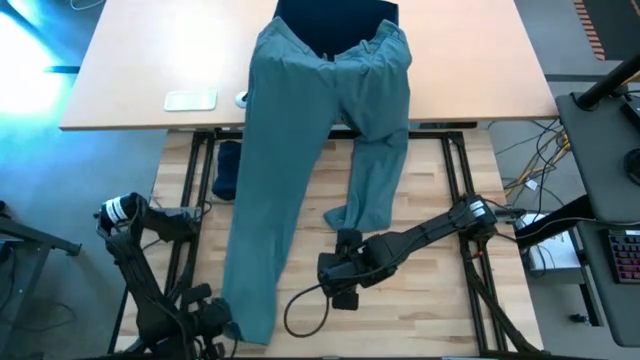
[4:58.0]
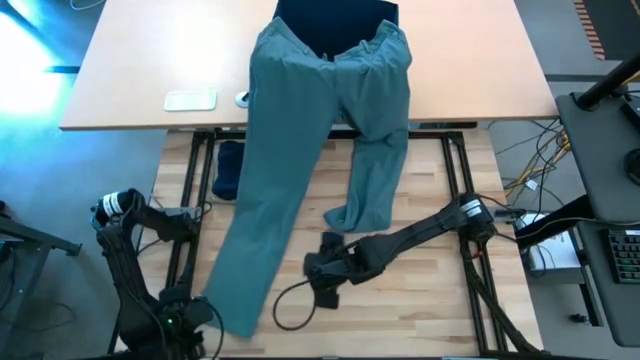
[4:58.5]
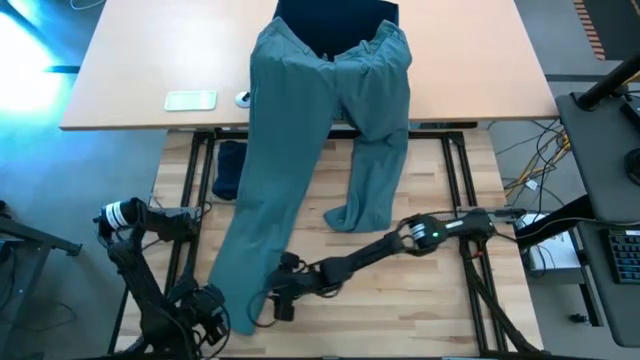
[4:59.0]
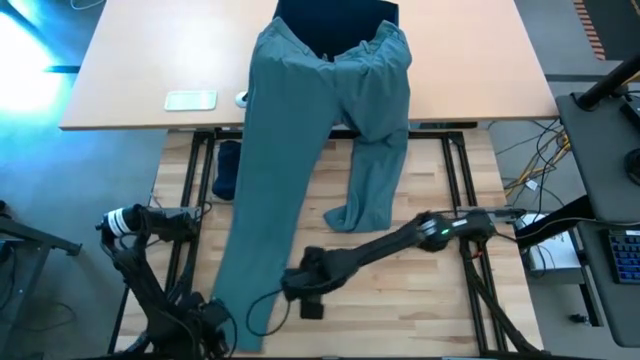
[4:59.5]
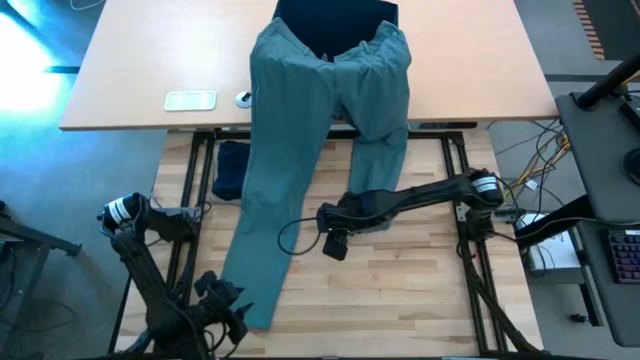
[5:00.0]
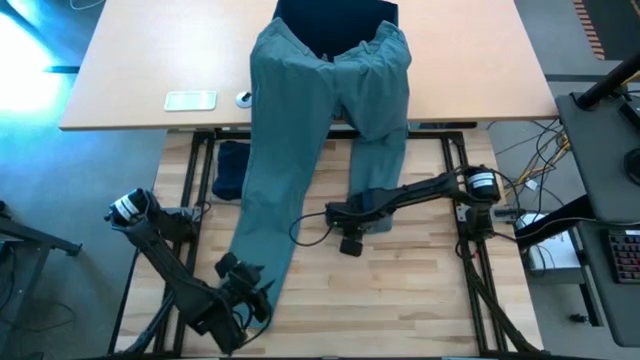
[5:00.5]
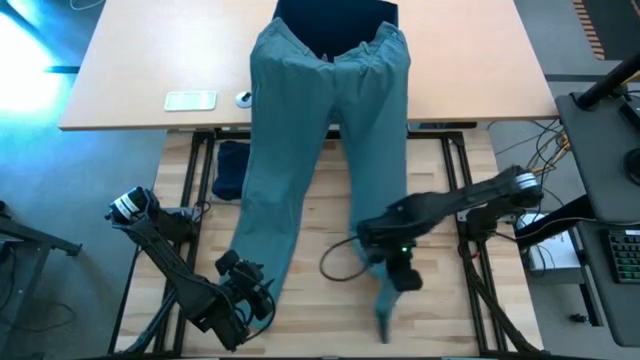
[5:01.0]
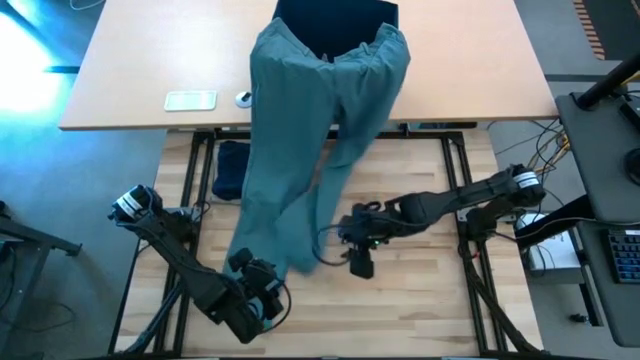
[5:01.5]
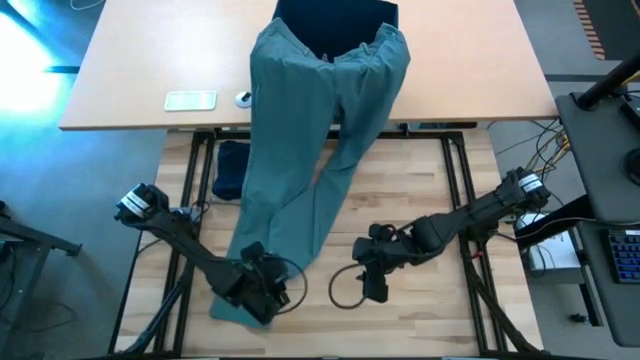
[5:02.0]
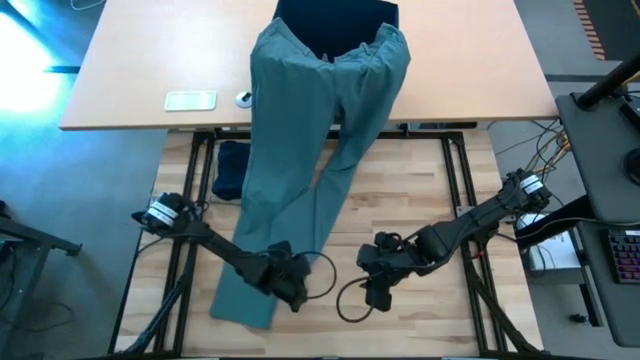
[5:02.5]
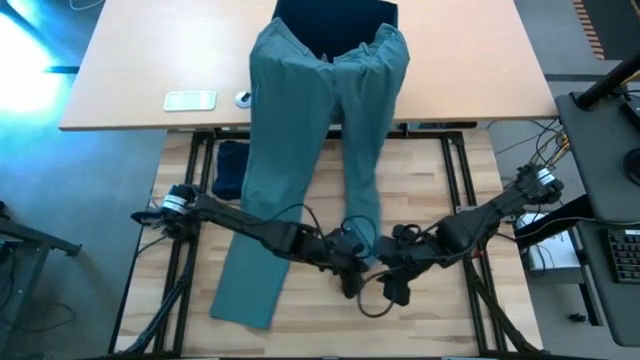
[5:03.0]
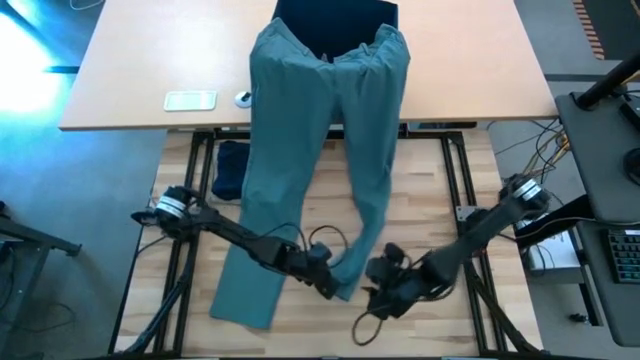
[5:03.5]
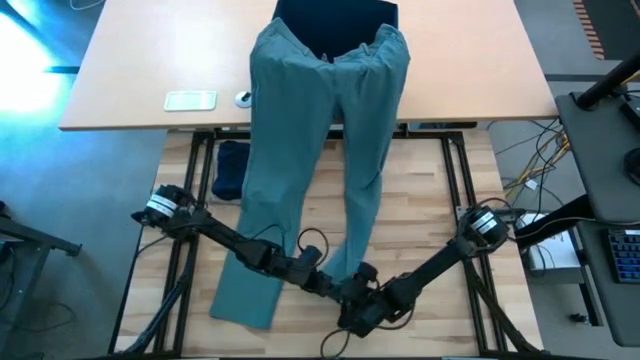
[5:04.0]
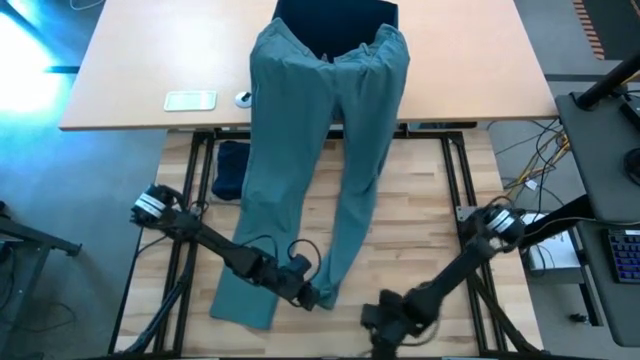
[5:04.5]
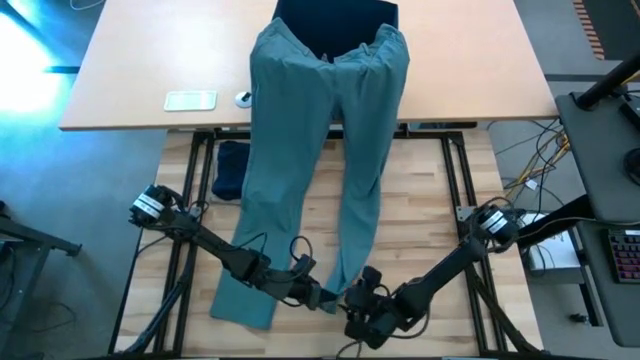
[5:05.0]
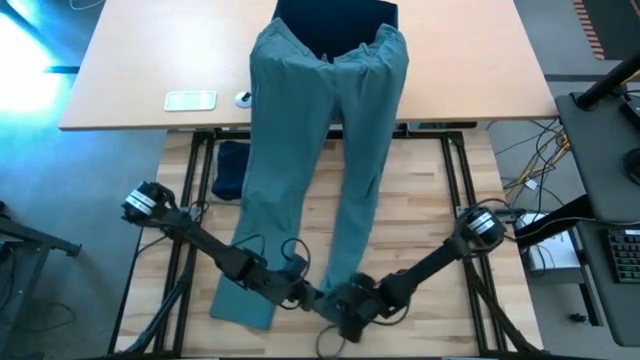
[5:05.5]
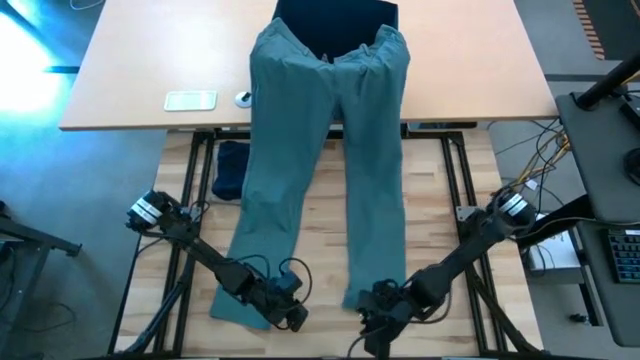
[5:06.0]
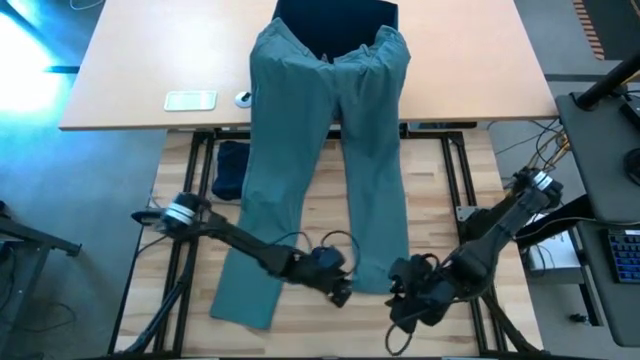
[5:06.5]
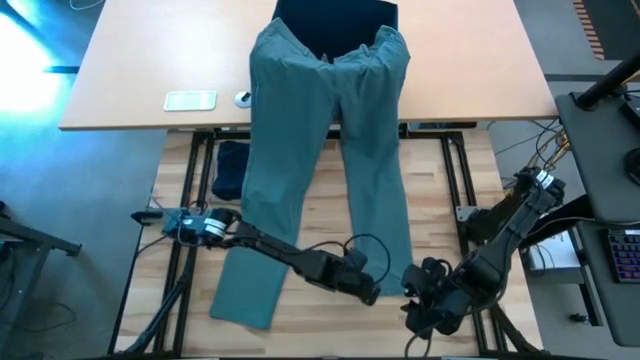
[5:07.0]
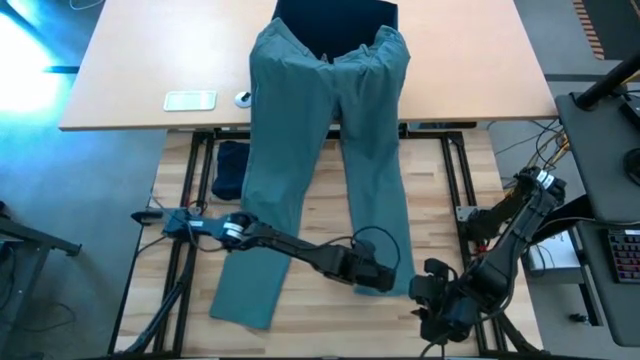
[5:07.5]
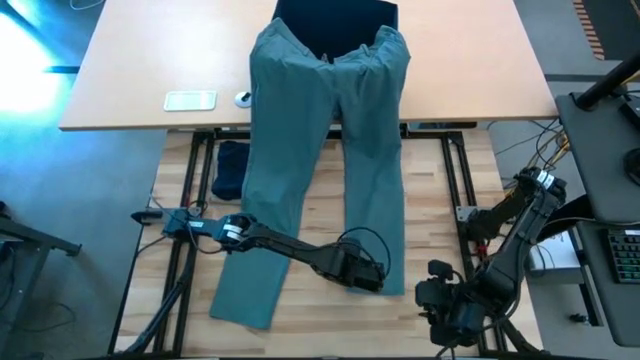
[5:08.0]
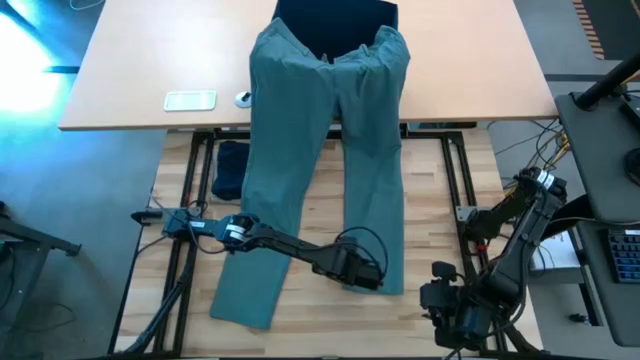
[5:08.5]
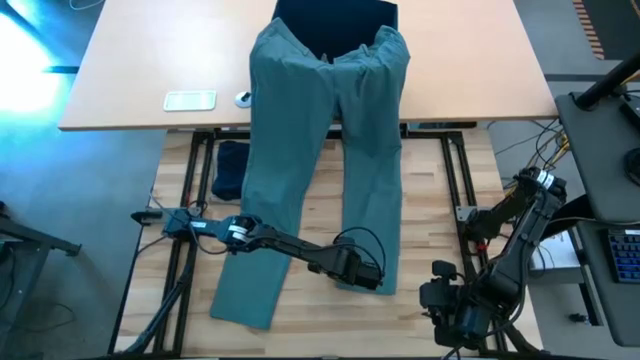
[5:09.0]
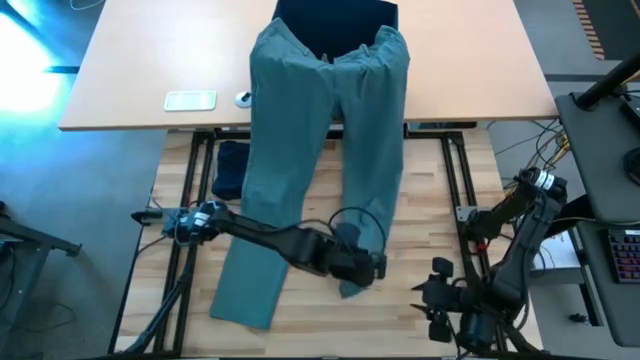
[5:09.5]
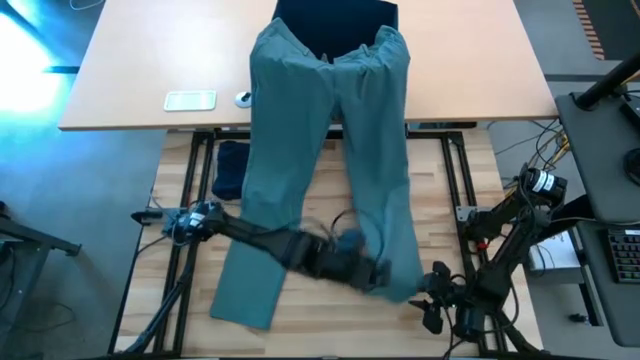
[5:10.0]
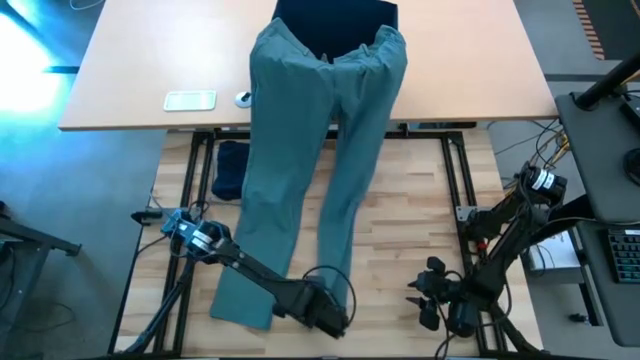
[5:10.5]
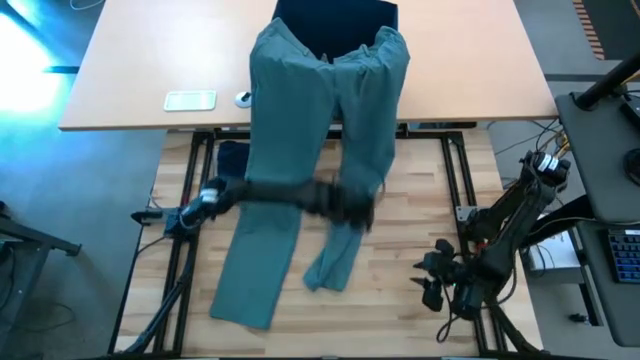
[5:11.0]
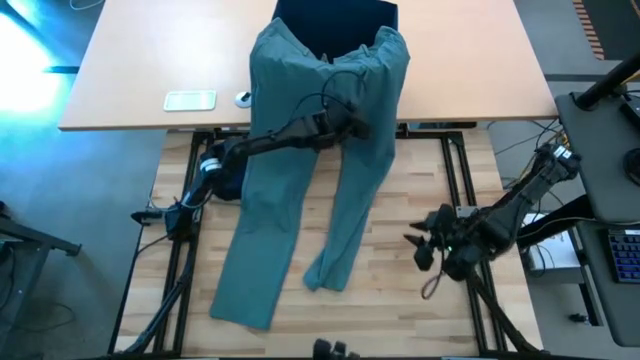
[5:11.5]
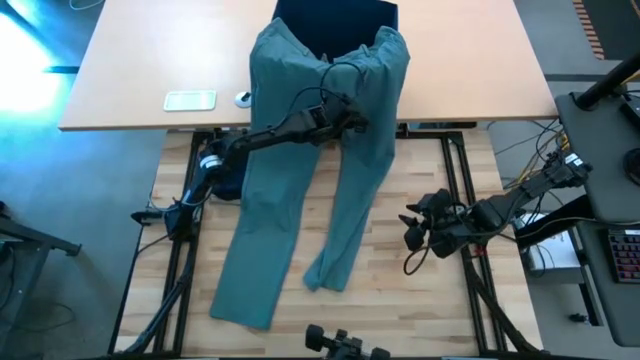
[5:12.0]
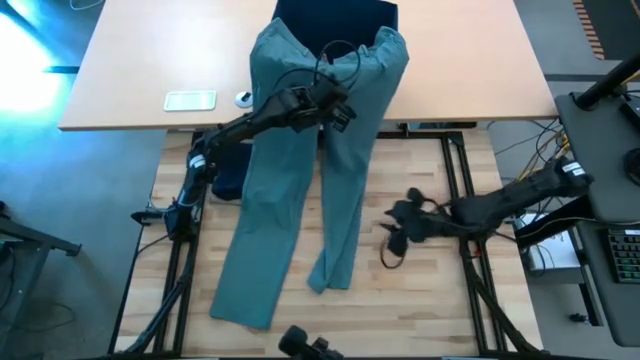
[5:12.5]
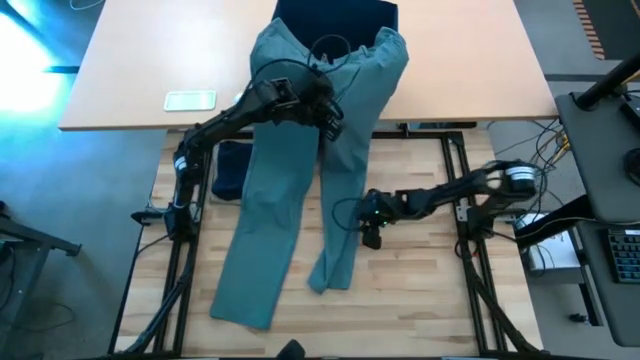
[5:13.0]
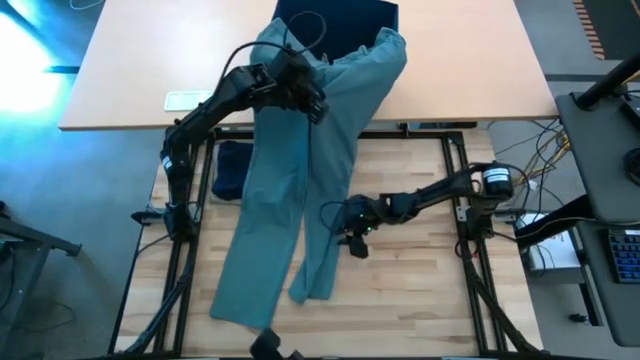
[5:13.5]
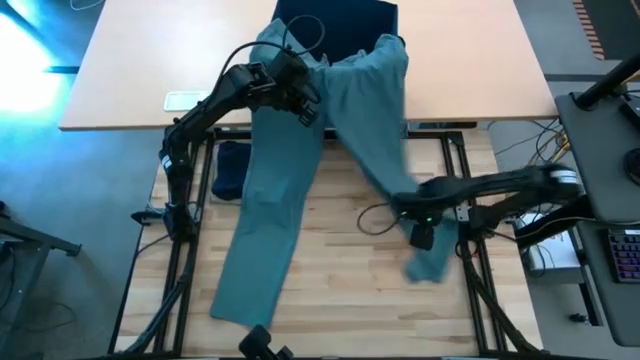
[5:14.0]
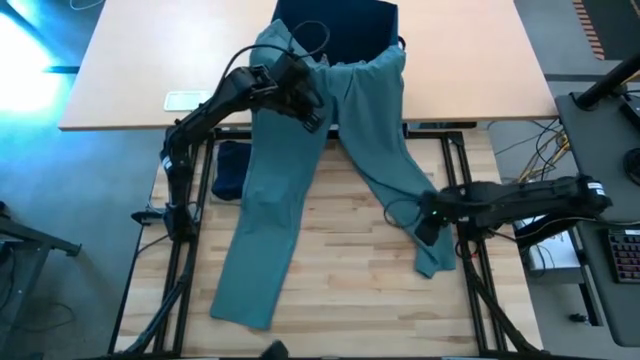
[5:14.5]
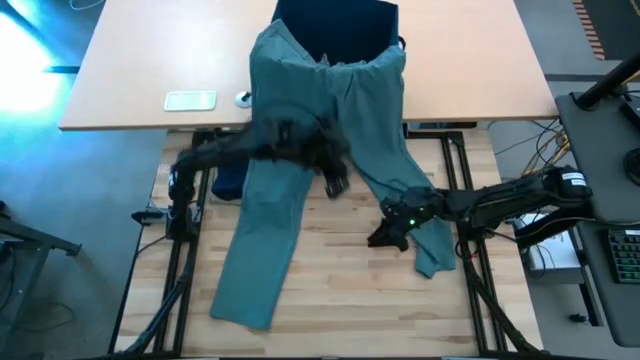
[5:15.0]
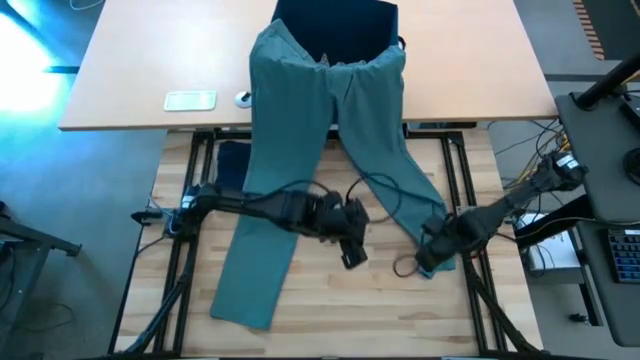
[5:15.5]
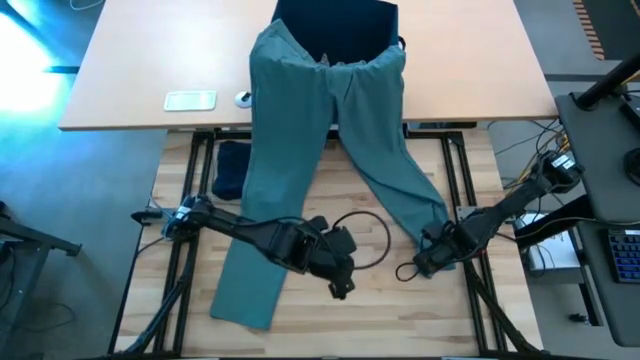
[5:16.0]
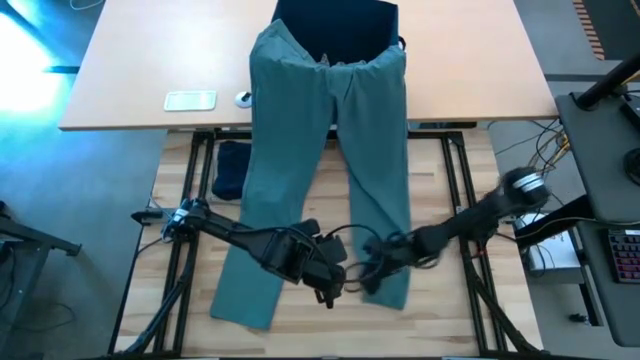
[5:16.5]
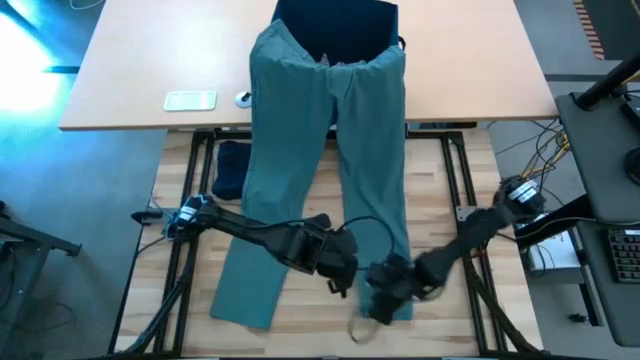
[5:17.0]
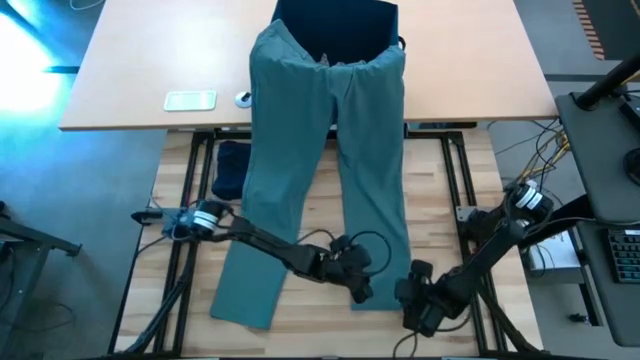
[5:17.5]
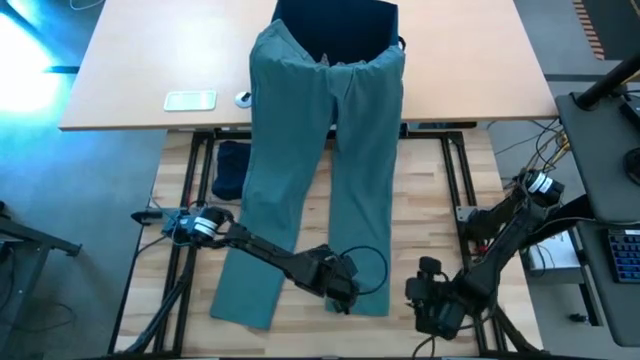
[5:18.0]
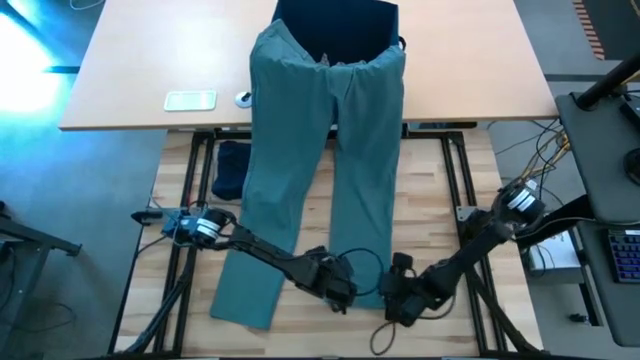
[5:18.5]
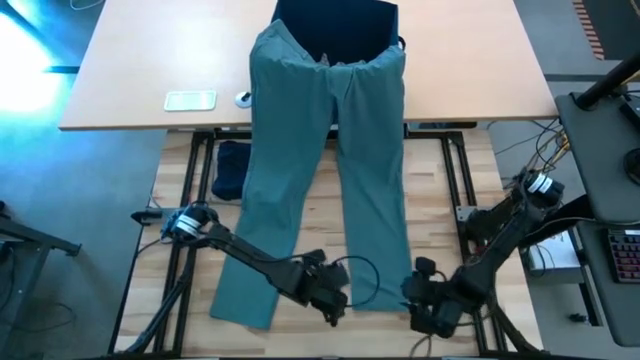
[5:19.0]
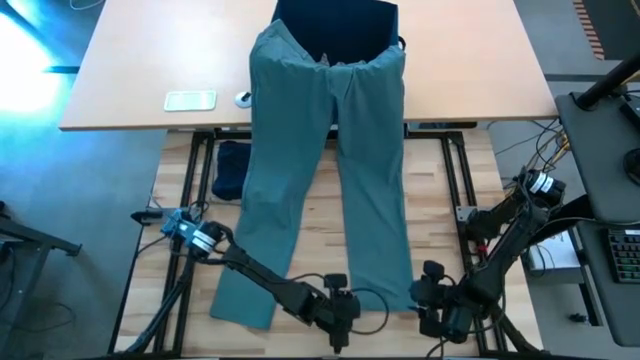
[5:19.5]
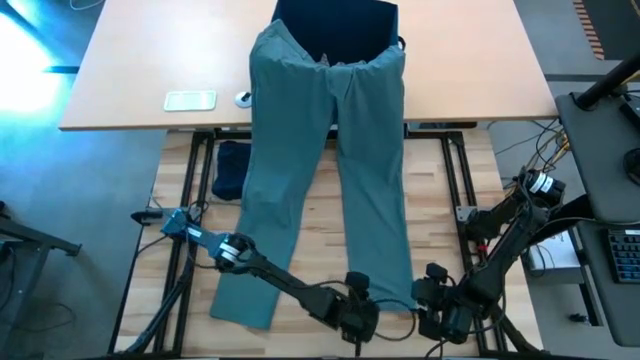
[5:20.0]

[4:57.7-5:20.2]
Task: Fold Laundry from Bin
Fold the gray pants
